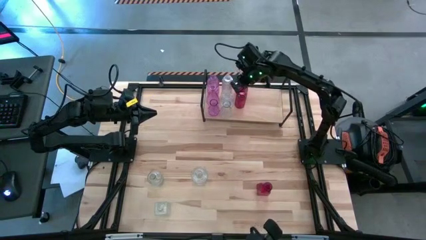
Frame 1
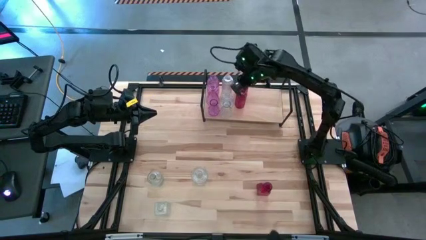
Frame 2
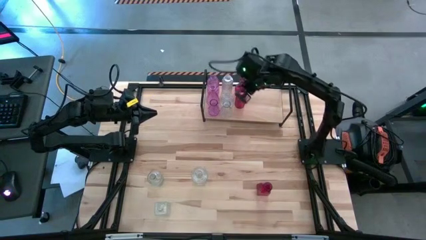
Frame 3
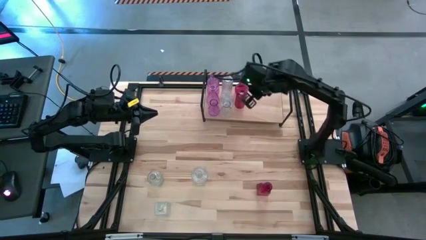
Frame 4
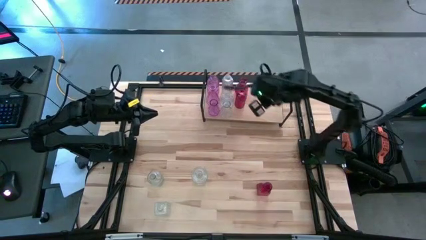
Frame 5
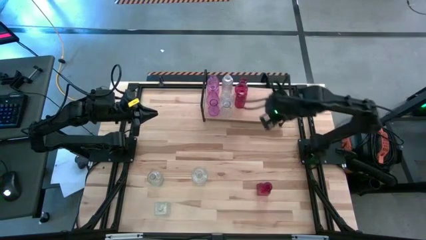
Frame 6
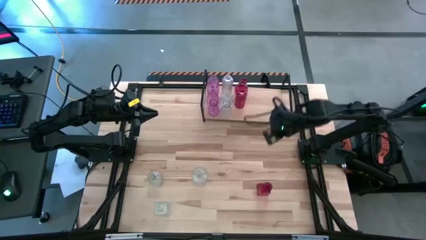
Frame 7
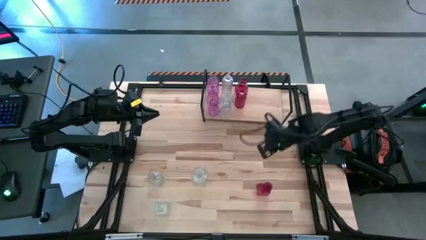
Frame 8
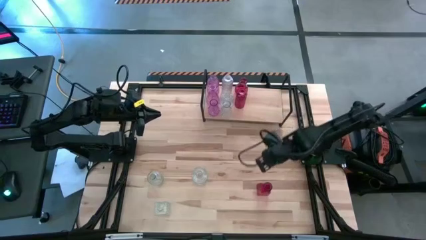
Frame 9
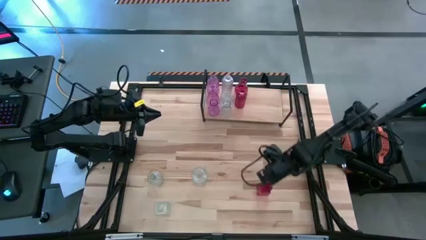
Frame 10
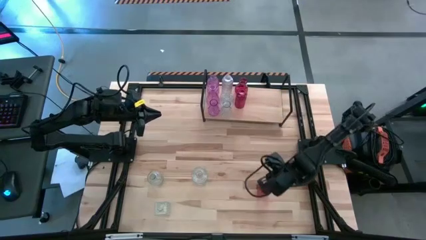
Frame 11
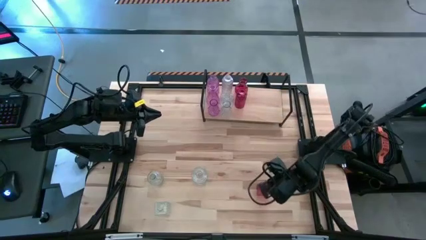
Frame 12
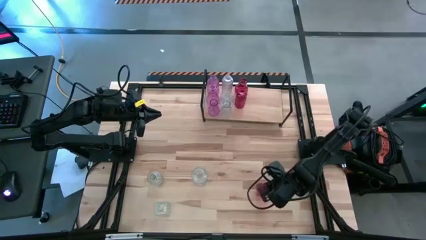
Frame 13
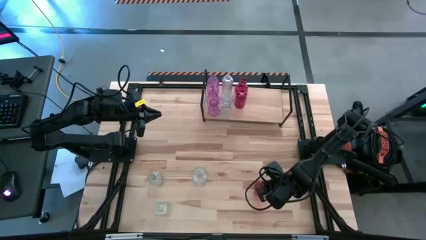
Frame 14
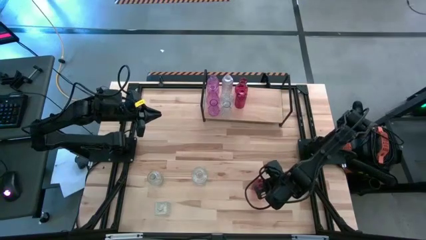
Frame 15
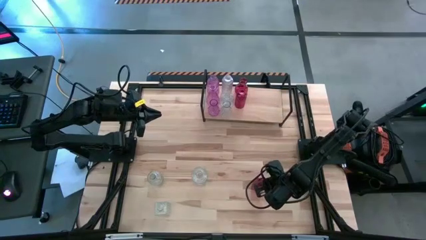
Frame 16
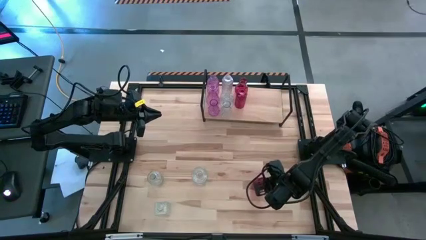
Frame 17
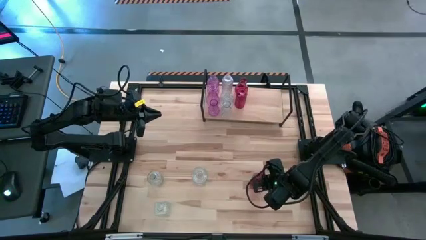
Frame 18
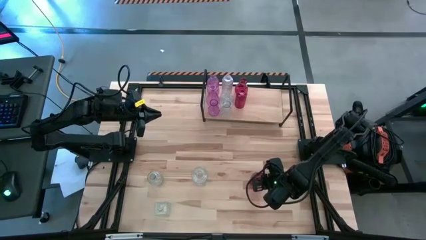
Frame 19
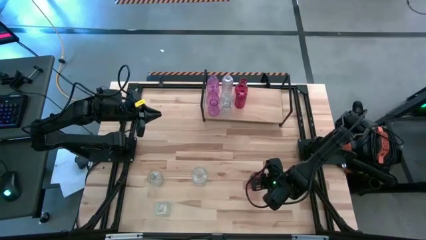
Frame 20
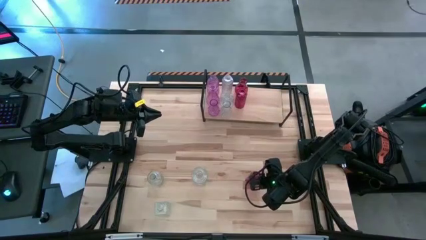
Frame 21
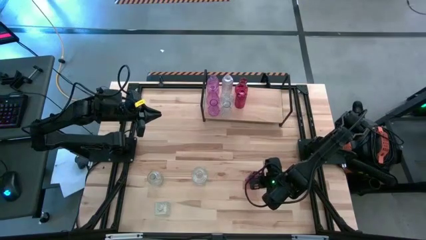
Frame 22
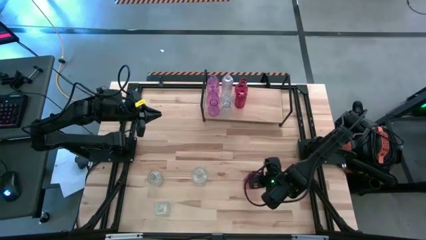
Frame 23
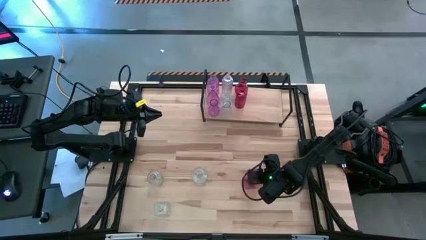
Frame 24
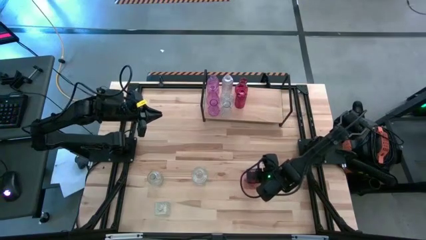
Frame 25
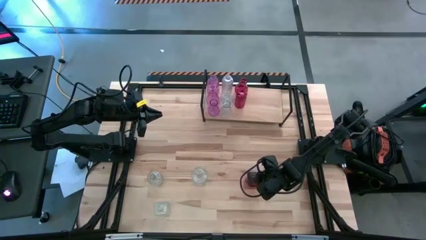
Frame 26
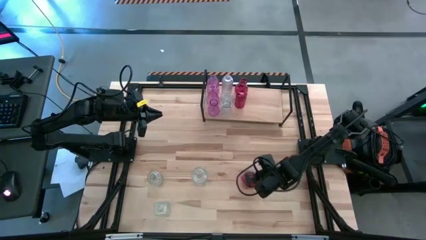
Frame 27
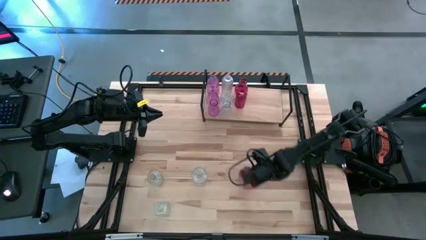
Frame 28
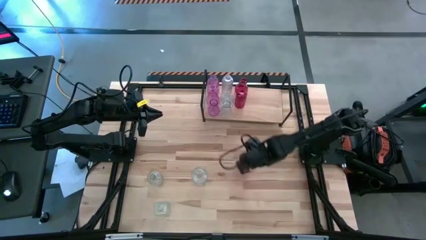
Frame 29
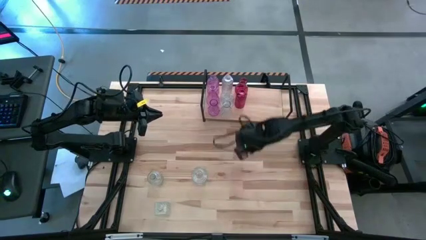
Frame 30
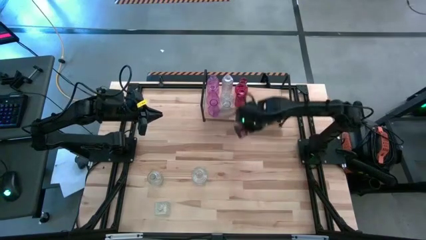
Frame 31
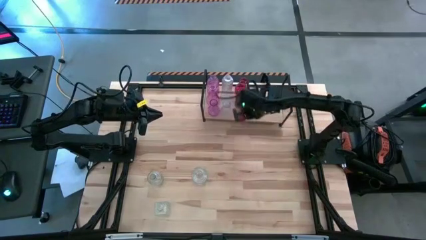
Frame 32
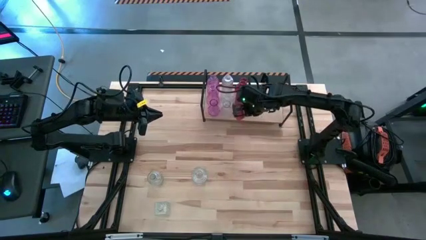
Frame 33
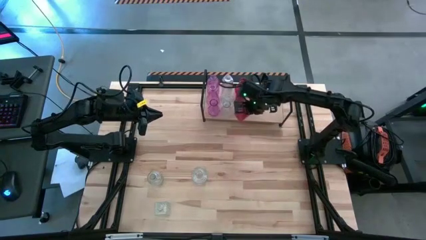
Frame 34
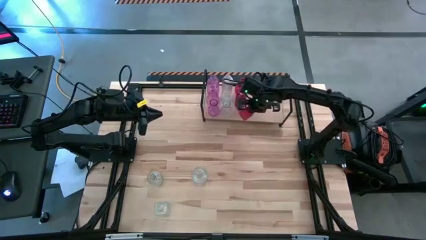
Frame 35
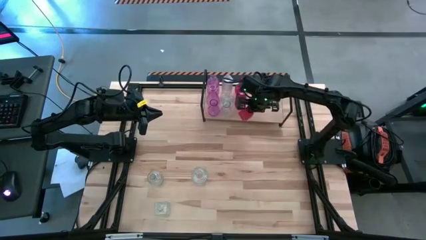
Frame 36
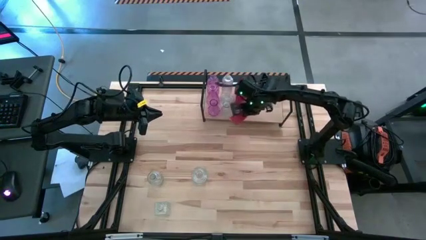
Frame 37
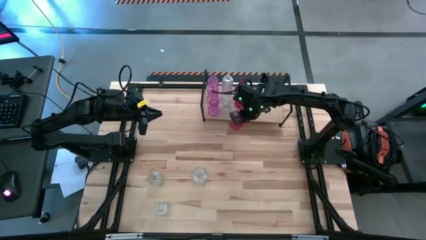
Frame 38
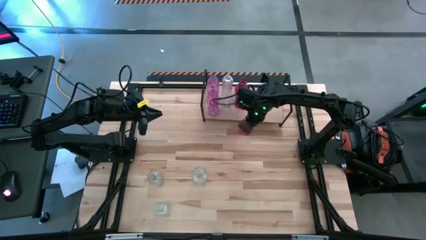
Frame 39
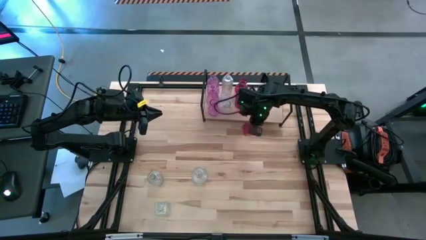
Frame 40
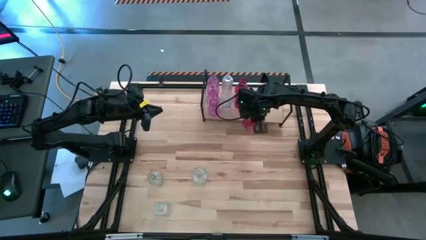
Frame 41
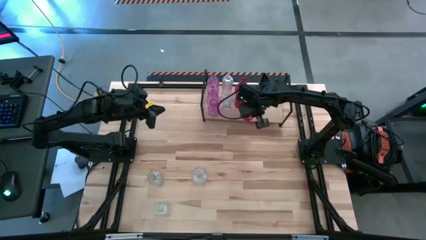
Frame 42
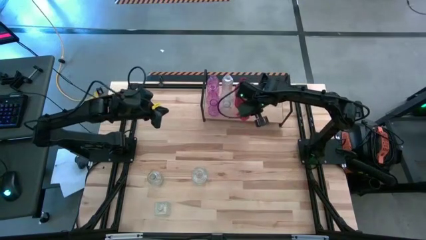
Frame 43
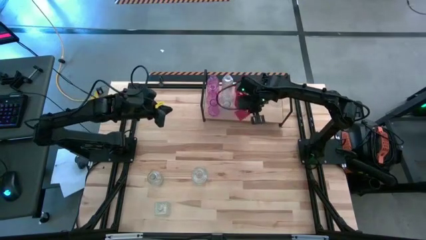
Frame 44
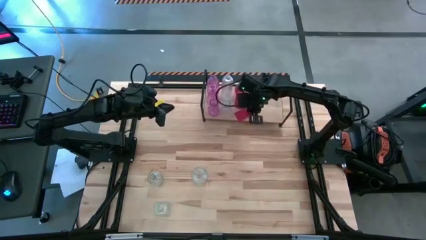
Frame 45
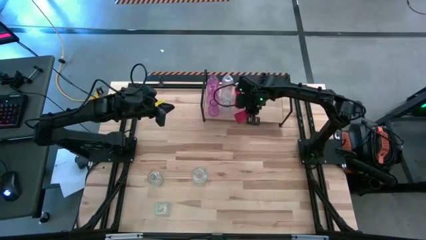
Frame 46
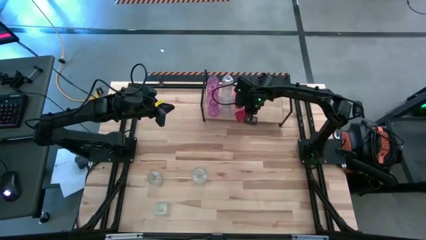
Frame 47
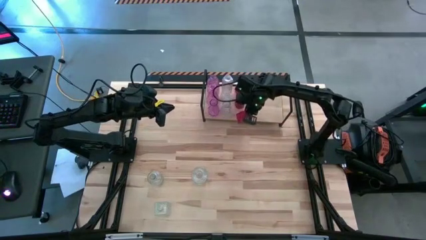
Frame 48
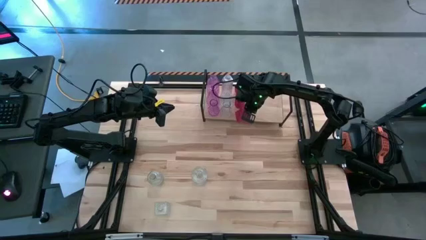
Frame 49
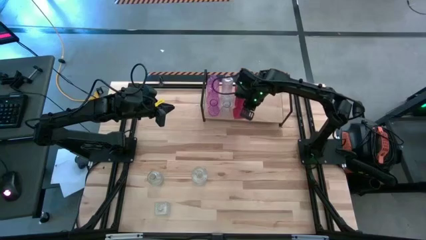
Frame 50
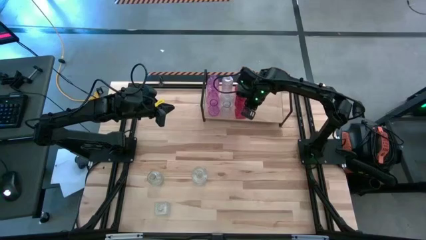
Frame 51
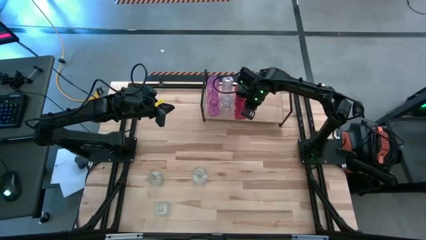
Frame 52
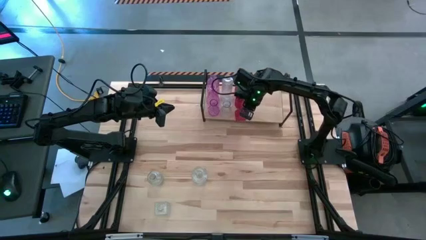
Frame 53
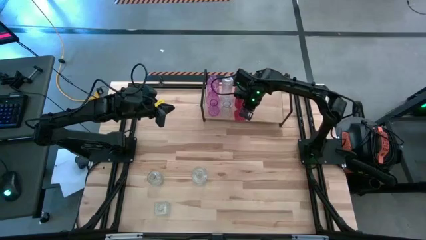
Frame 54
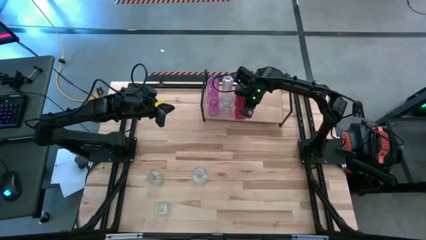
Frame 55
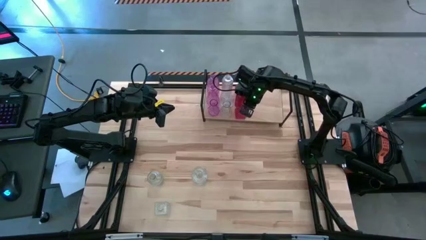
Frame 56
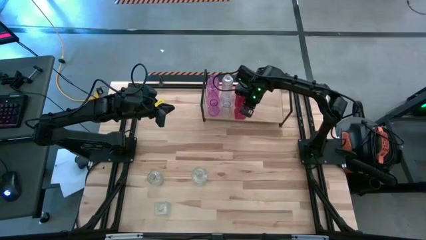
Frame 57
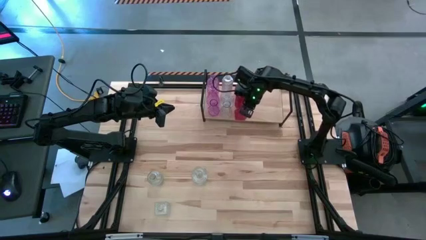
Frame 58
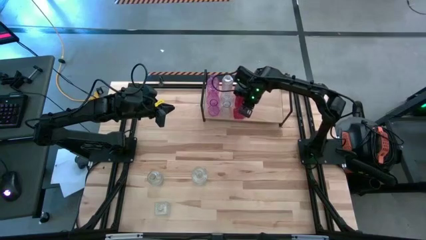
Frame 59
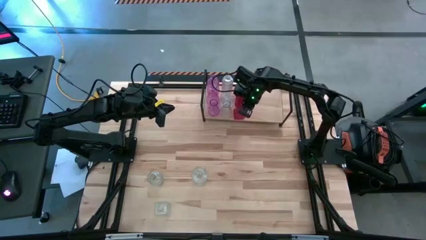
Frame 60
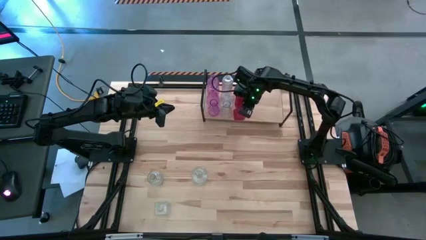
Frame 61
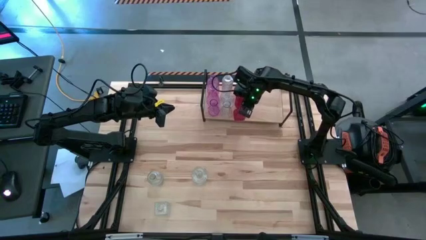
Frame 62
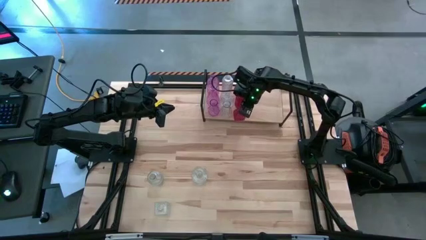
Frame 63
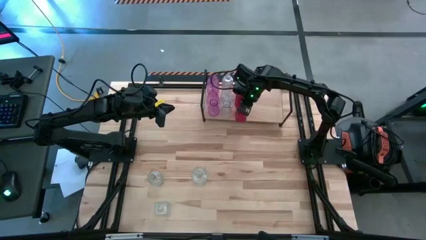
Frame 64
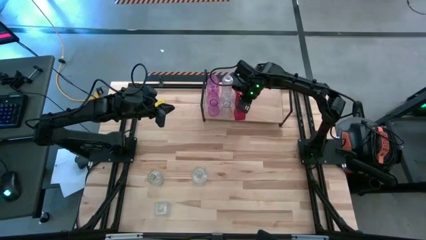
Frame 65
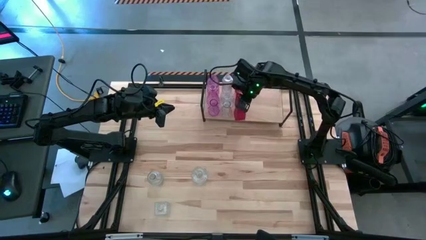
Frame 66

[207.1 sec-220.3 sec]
Task: sort vases onto shelf
Align the red vase with the other red vase on the shelf
